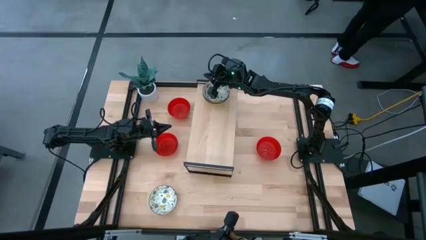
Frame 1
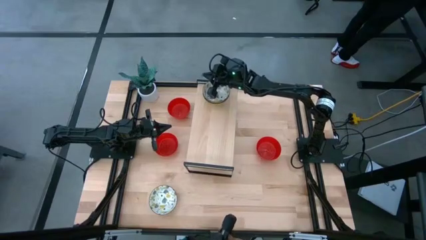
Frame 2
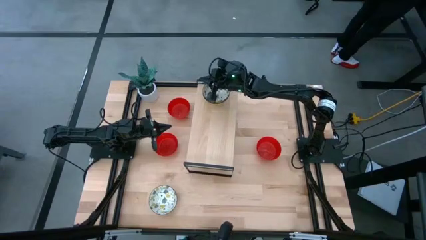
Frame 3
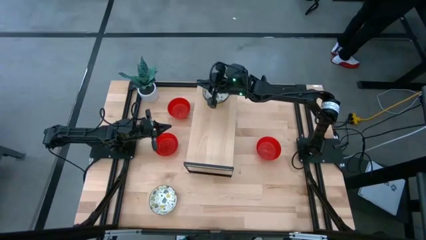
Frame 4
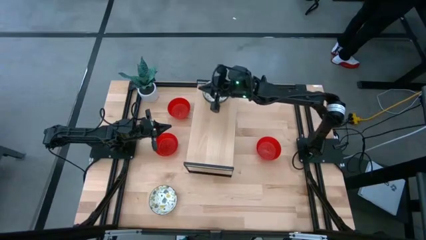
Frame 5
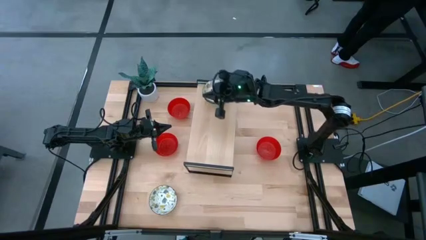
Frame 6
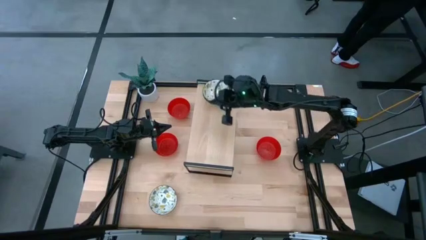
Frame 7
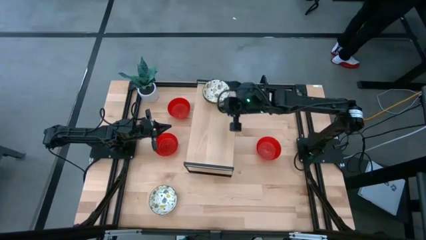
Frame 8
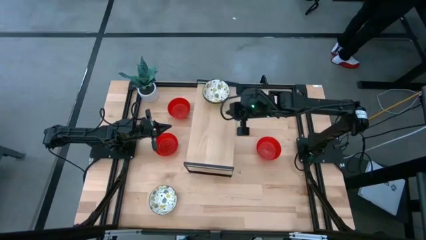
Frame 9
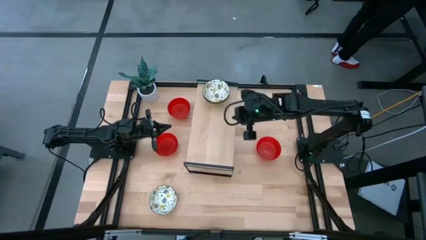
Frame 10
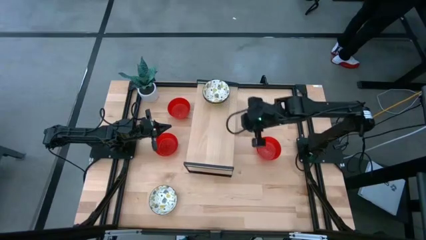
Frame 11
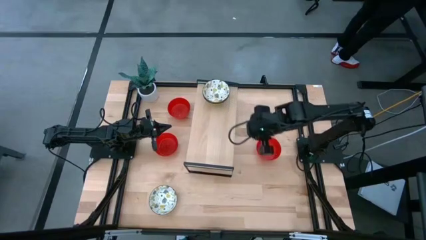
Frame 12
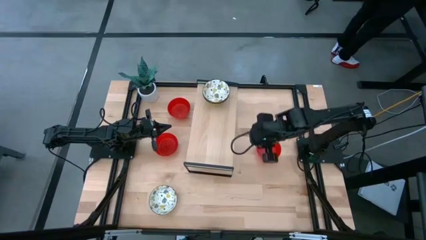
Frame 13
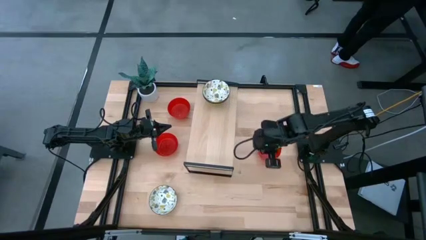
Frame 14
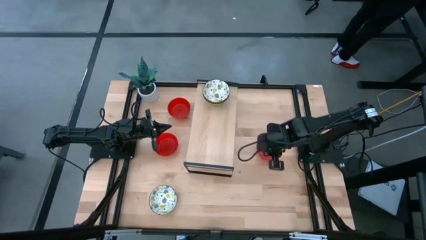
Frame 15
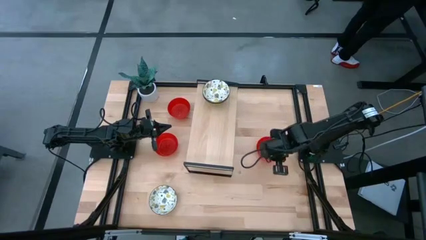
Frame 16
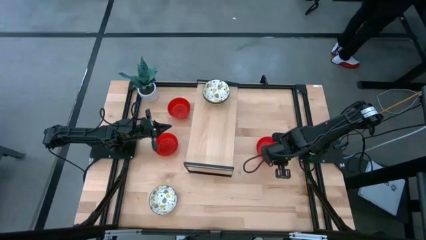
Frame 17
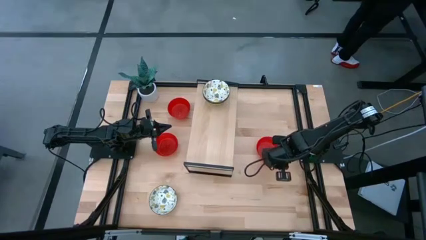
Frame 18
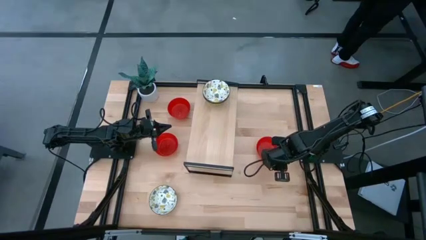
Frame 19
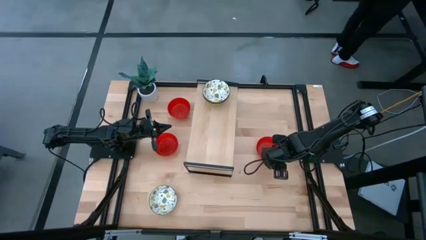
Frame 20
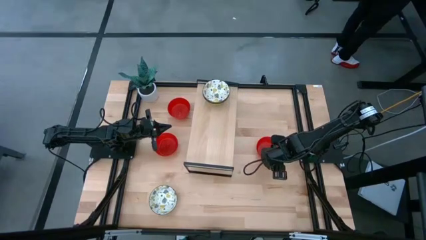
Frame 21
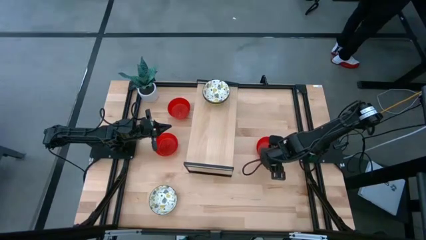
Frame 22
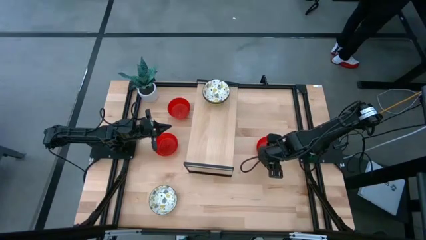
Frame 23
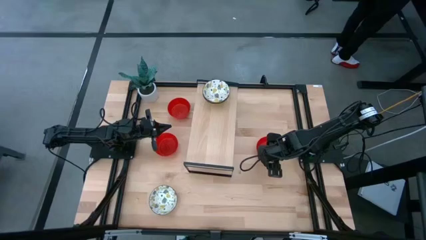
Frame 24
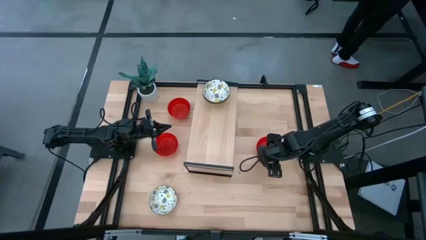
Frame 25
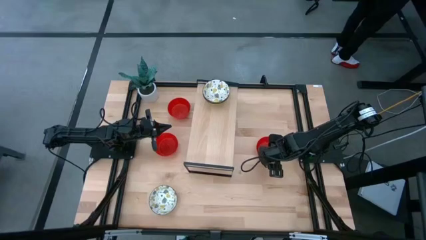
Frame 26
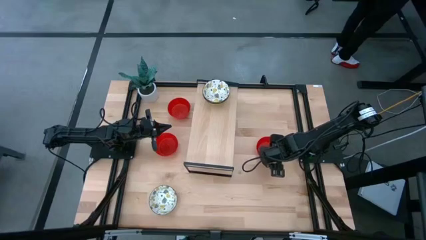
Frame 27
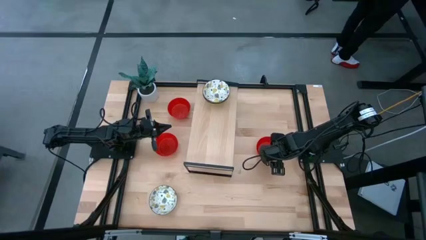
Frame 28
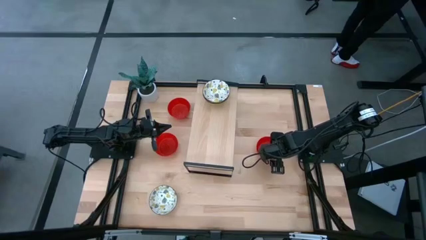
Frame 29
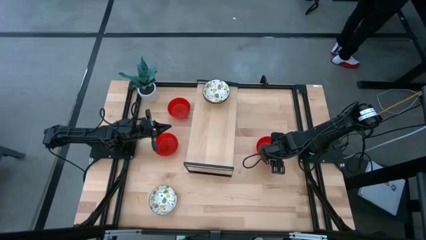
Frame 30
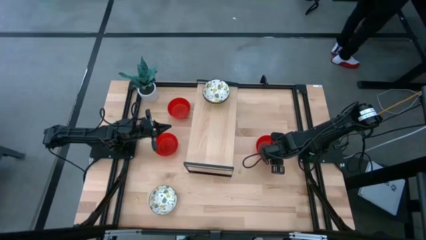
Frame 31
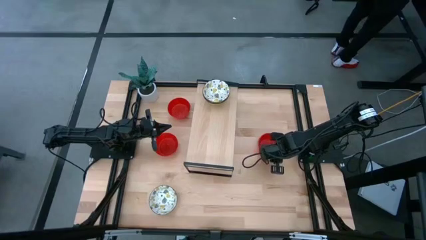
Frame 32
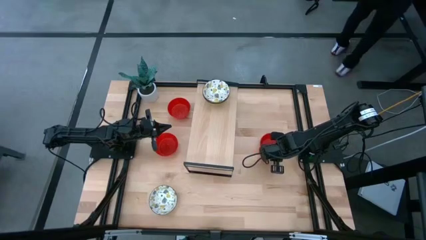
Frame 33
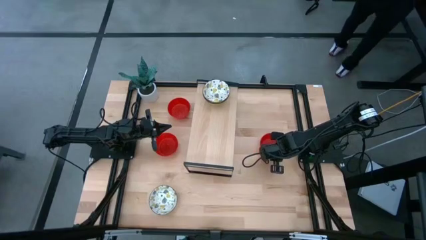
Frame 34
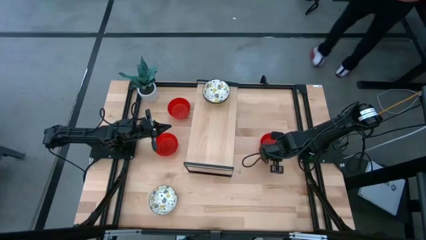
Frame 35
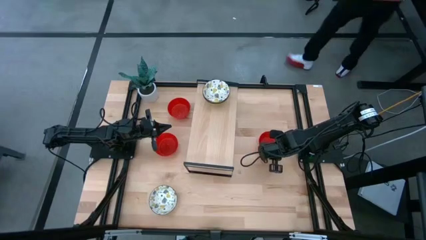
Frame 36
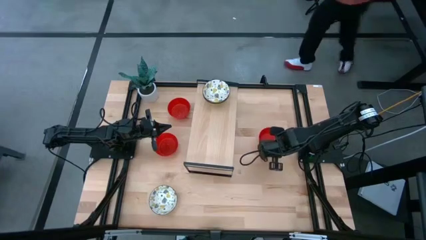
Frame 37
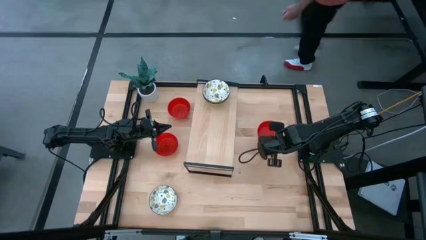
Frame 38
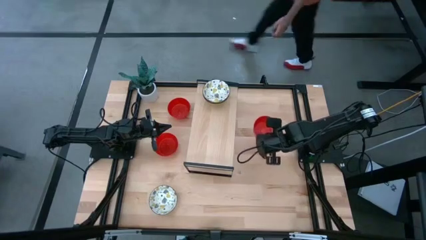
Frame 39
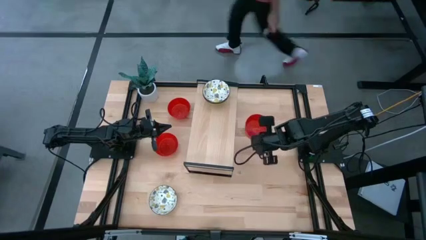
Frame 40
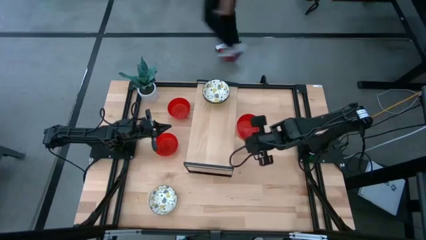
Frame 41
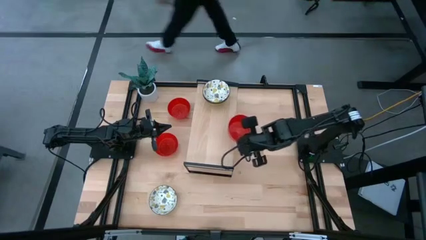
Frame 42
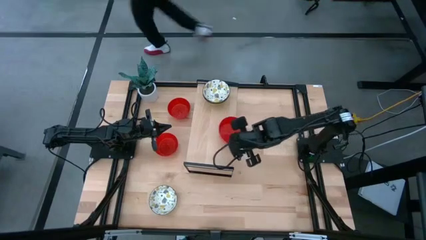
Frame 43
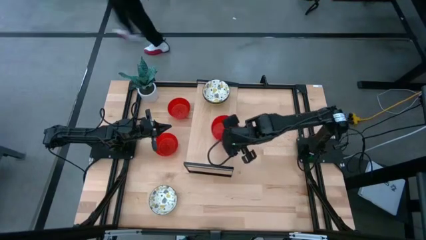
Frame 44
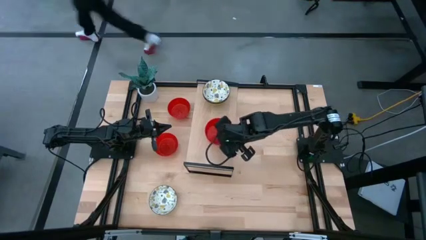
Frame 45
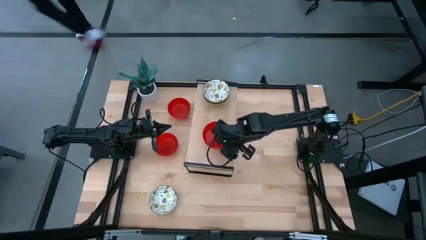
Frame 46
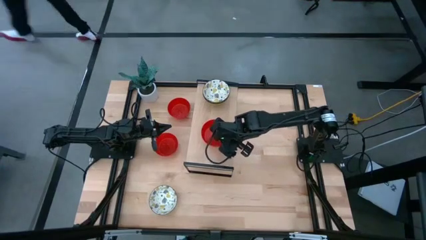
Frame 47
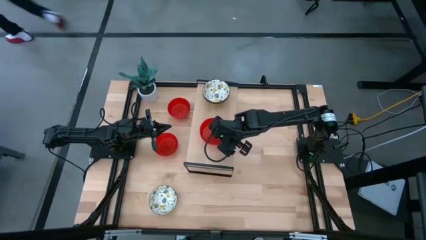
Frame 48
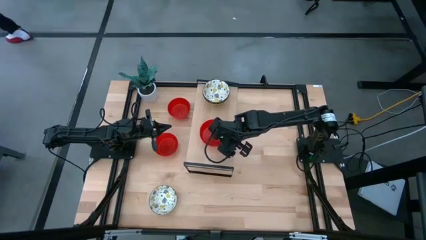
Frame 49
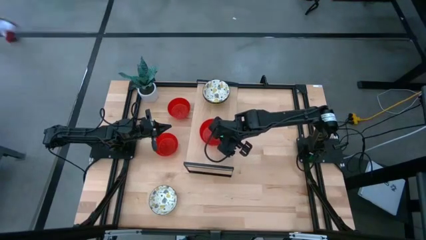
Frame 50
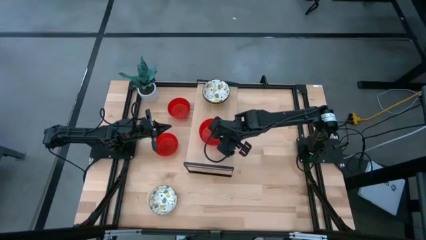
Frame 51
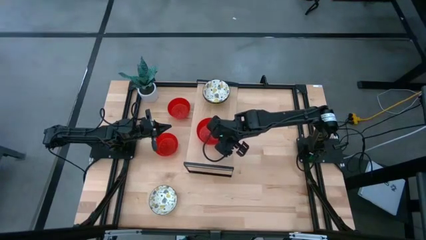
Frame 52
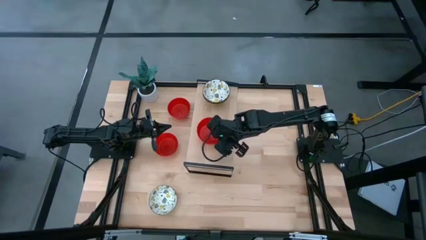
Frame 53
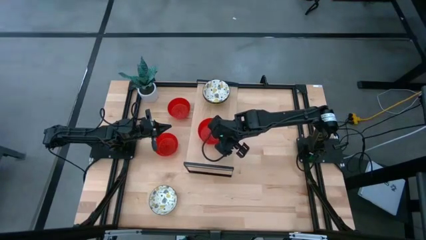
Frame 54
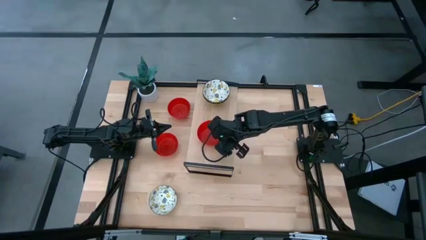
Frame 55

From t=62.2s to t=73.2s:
Task: Pick & Place Mini bowls
Put the bottom right red bowl on the shelf

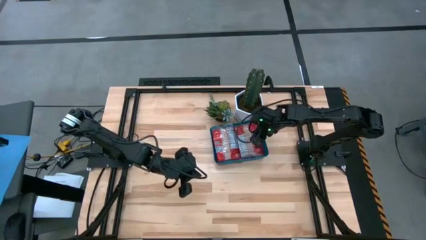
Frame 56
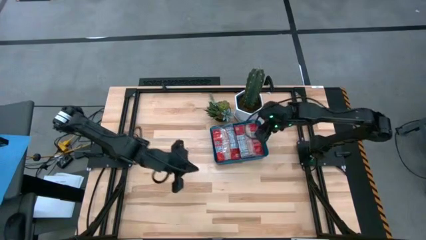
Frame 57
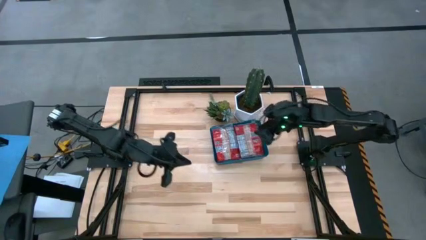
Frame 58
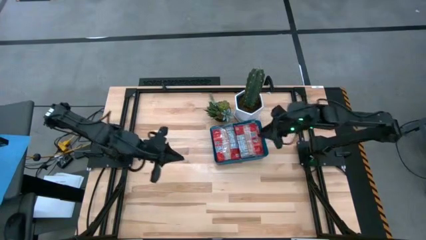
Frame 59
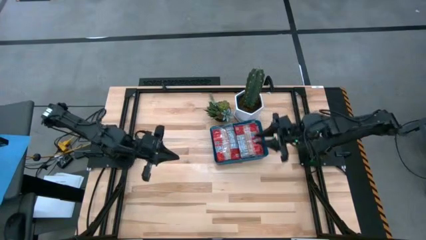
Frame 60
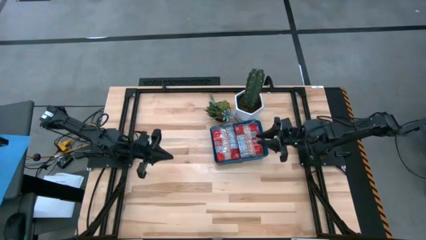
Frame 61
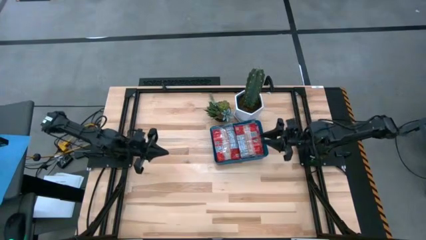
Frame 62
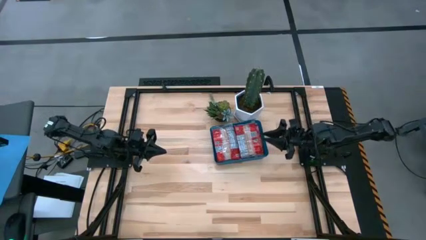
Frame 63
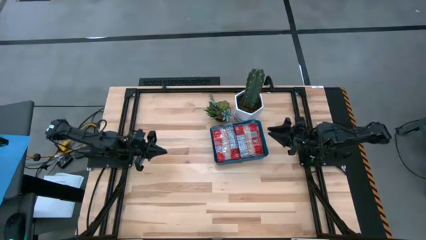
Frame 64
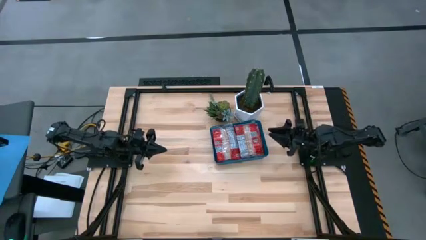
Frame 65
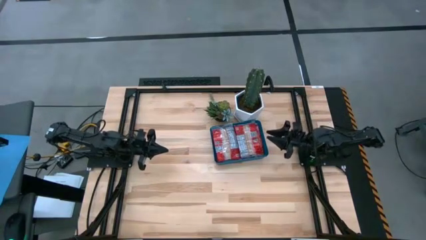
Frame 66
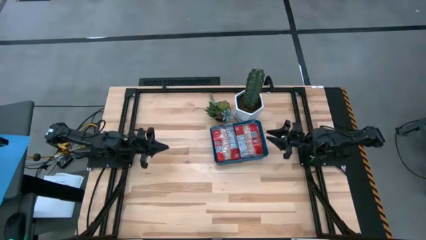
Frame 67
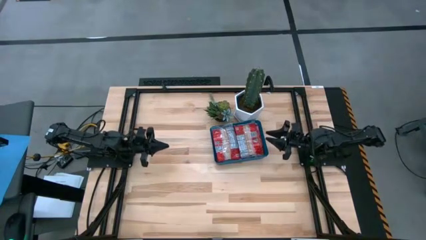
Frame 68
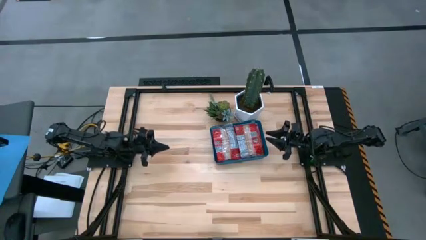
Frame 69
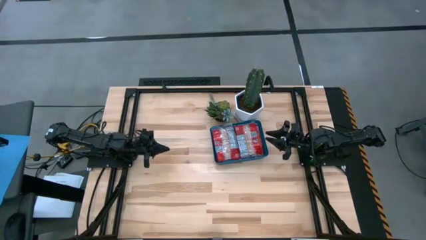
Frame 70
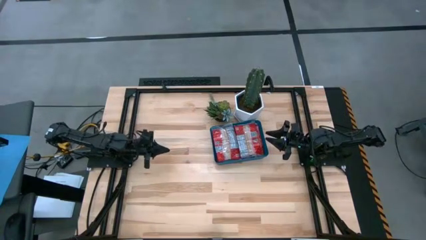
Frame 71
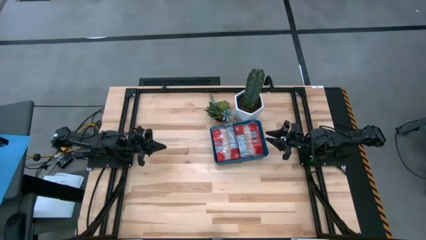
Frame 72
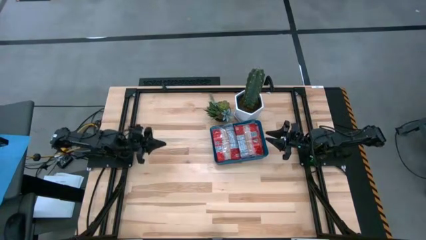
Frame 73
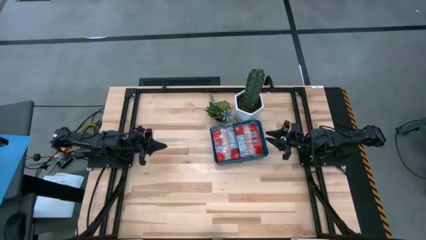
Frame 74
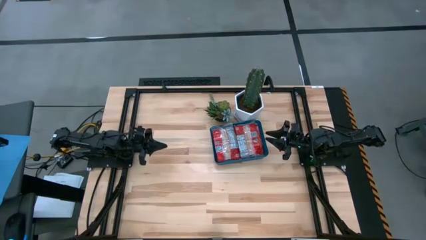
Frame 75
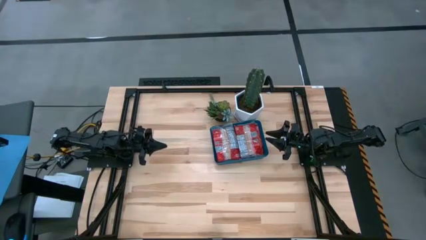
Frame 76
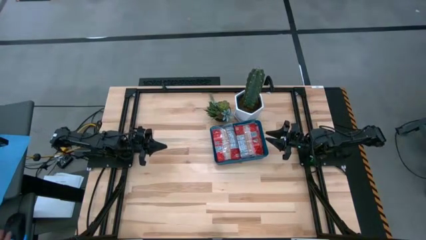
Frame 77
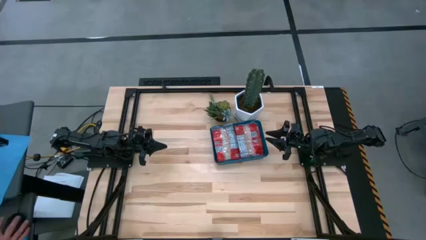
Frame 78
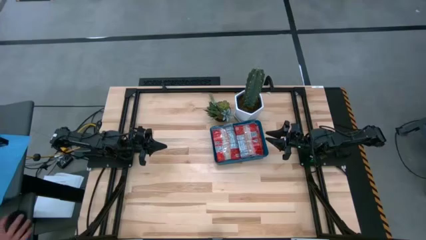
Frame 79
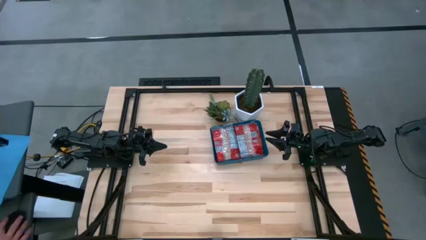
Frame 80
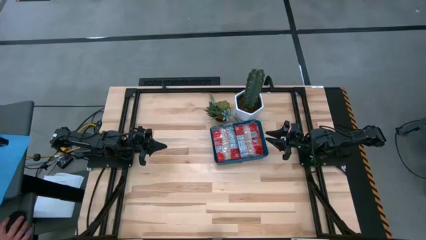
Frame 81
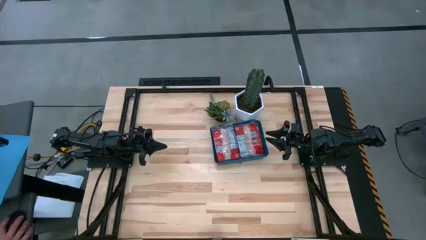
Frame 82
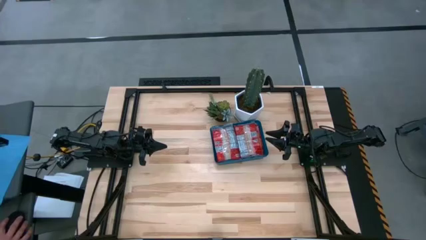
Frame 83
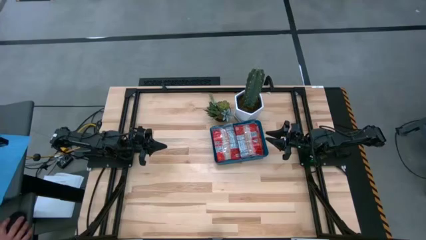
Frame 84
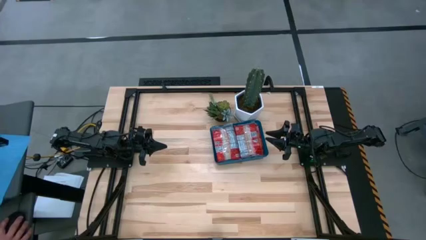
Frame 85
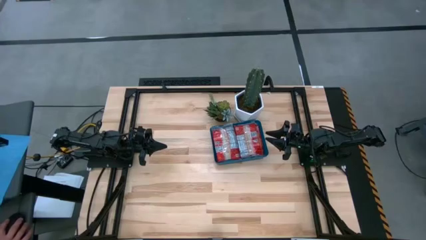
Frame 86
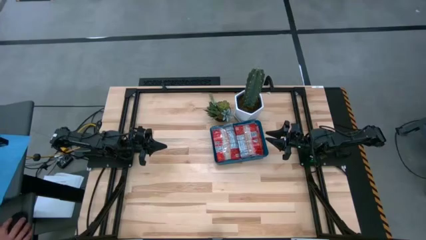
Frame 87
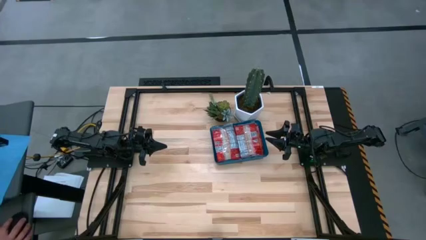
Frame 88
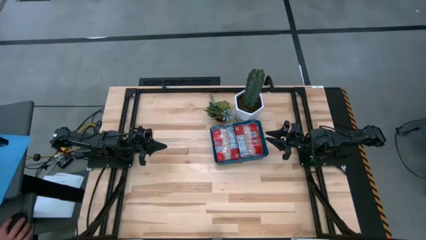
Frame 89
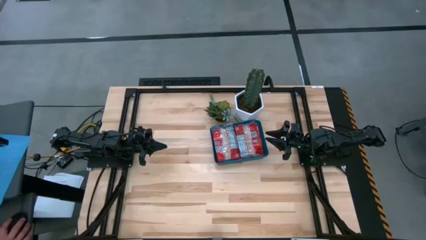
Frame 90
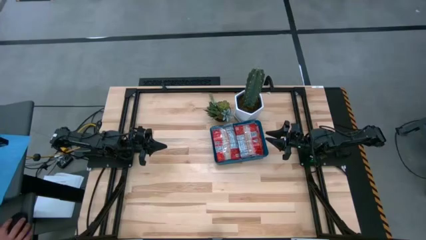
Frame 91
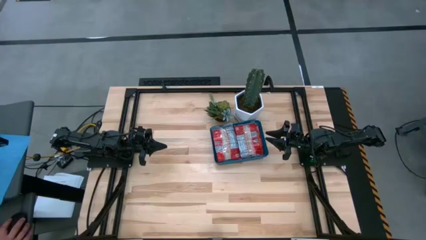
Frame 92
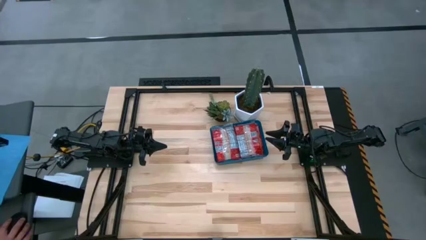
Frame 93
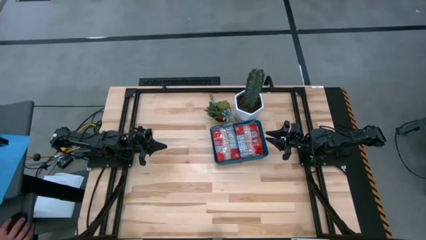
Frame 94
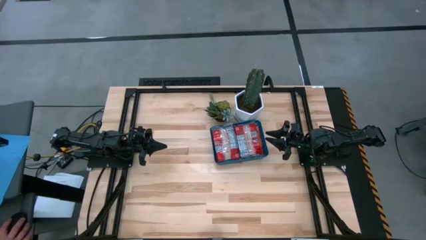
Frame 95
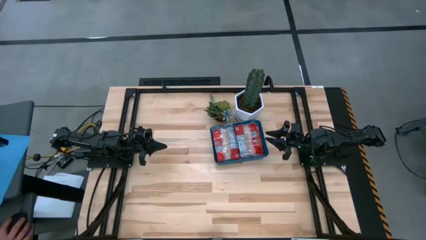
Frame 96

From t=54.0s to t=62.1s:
Task: Sort popcorn bags into baskets
Return to Home Position
